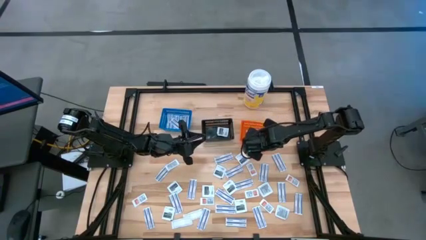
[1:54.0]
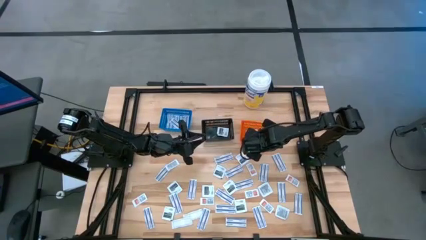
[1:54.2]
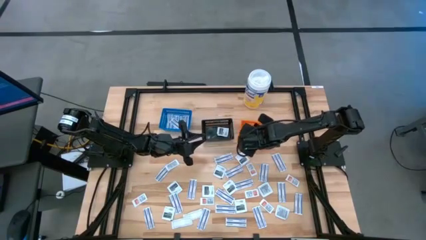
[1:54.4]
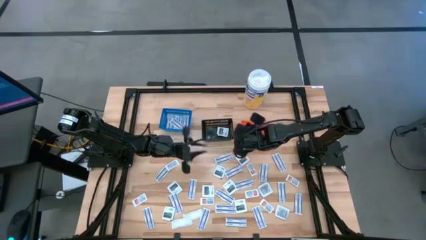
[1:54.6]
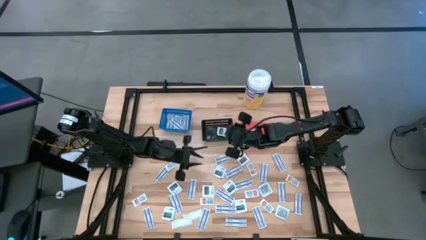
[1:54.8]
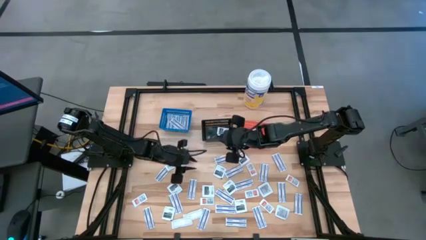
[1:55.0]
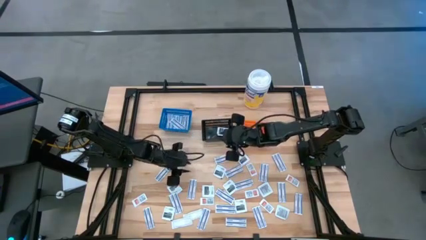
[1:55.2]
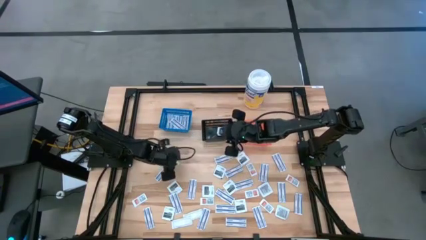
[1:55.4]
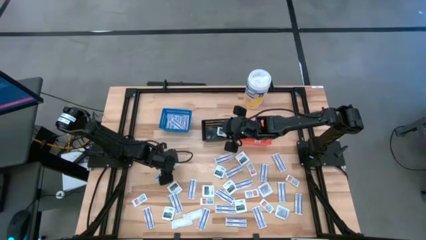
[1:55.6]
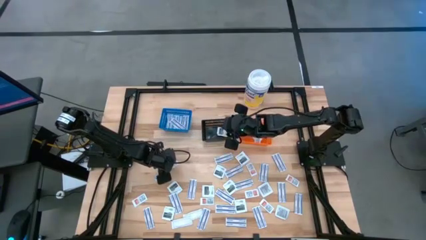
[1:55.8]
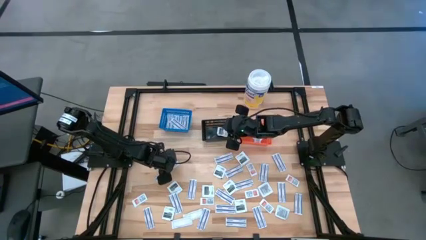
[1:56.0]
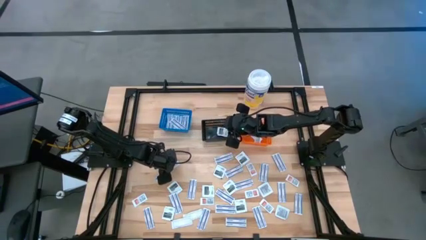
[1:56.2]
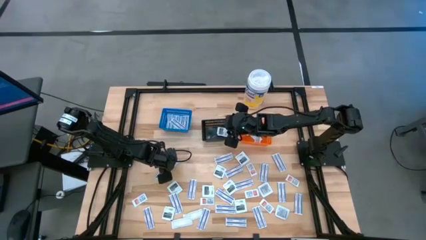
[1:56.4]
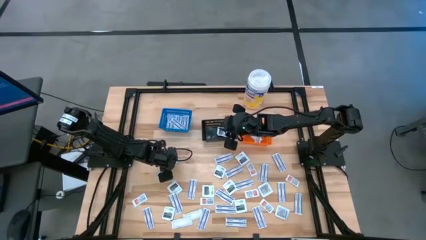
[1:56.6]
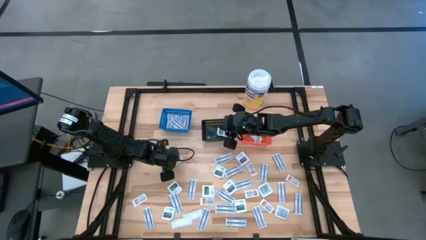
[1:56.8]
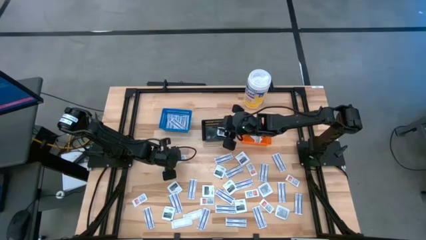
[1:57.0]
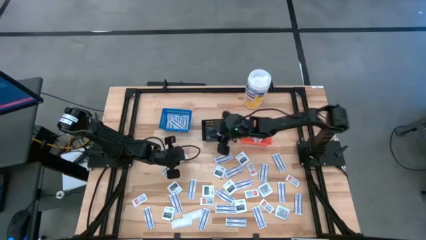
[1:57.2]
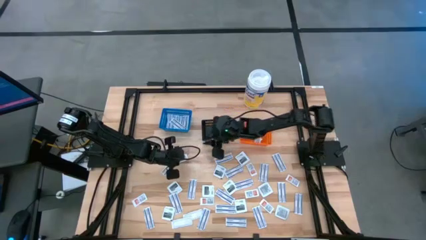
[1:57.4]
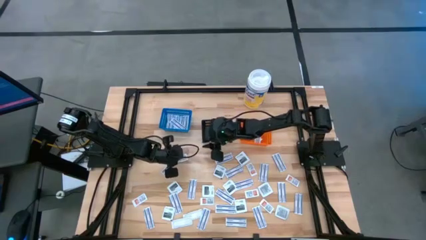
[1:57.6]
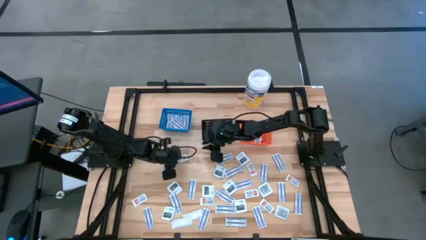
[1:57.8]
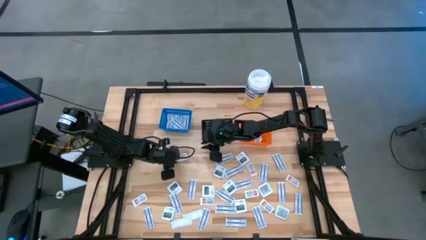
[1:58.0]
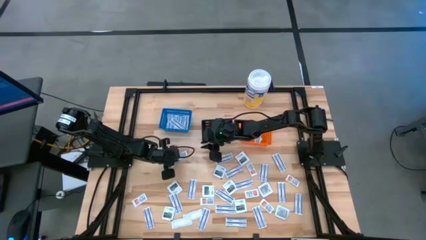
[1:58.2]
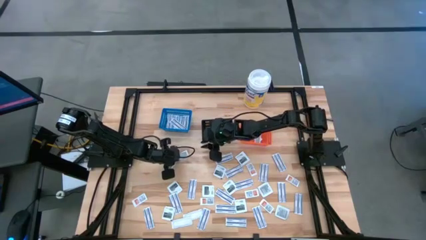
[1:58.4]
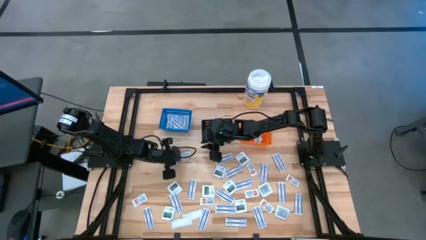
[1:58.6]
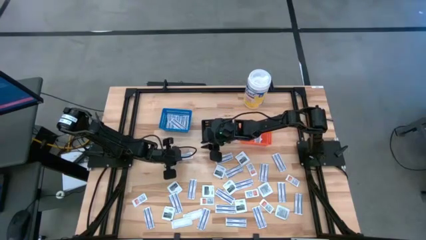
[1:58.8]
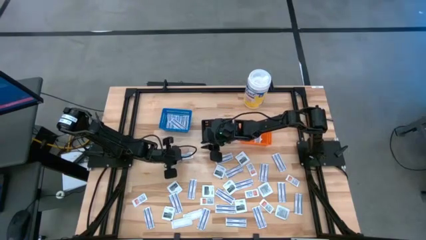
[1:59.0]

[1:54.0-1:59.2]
Task: Pick & Place First Aid Supplies
Put the ointment pack into the orange bin

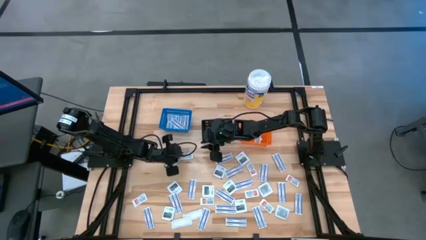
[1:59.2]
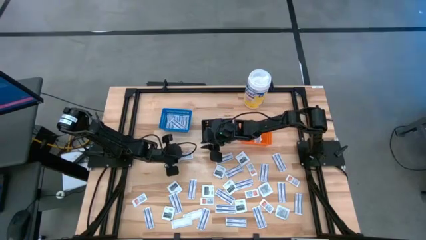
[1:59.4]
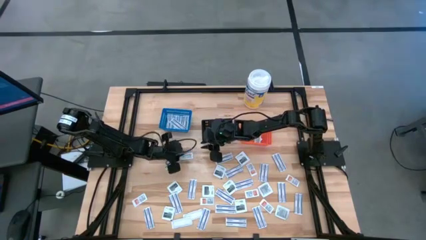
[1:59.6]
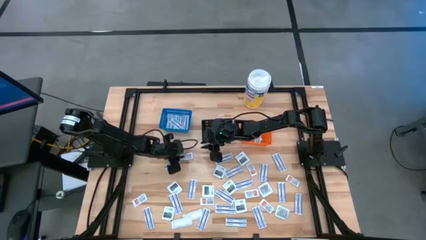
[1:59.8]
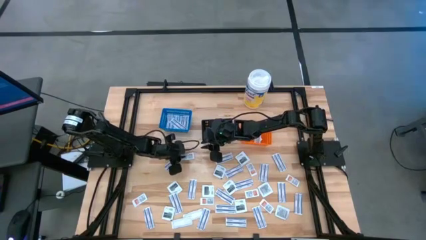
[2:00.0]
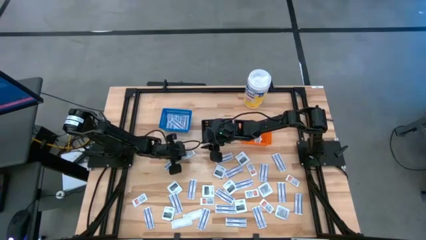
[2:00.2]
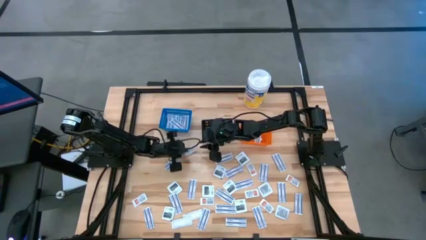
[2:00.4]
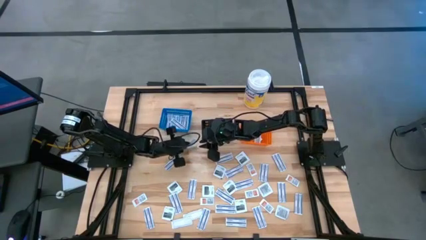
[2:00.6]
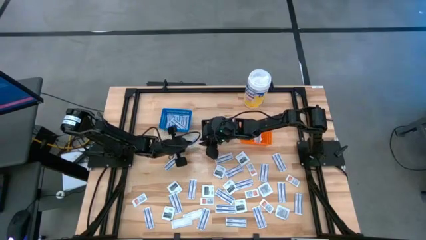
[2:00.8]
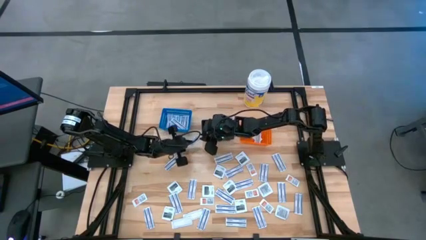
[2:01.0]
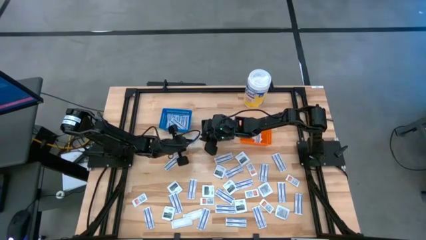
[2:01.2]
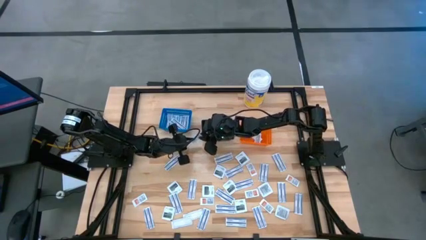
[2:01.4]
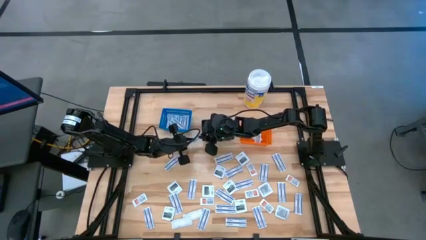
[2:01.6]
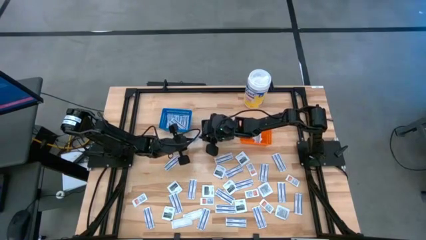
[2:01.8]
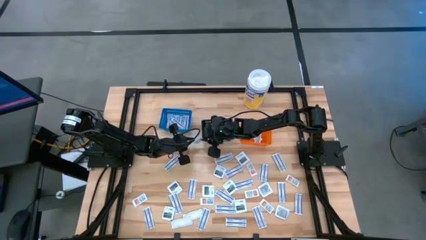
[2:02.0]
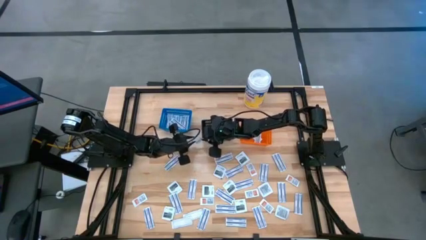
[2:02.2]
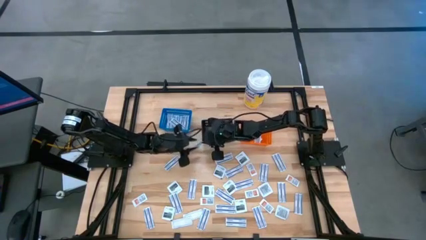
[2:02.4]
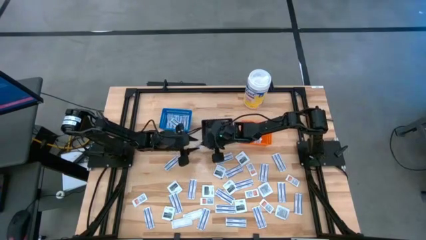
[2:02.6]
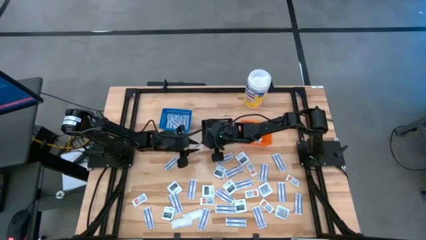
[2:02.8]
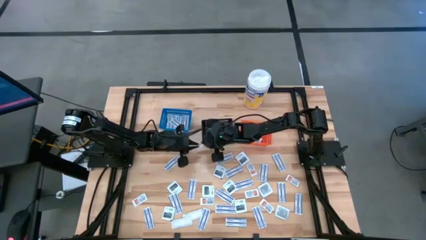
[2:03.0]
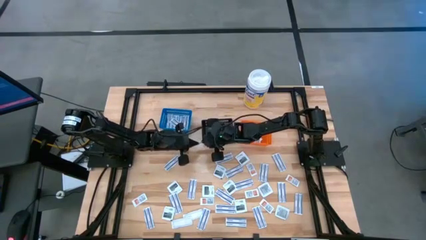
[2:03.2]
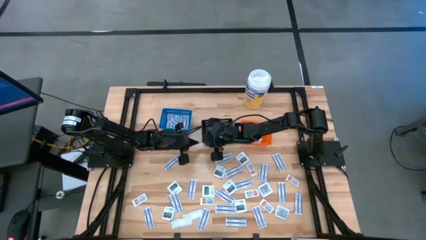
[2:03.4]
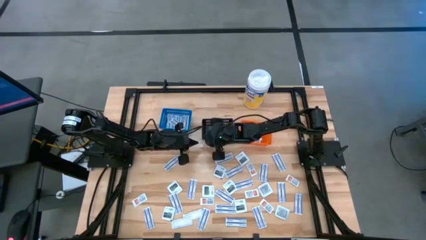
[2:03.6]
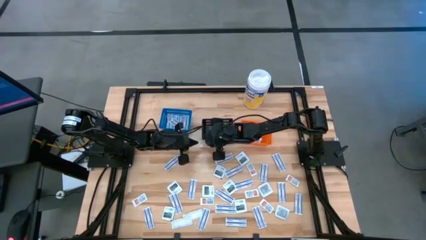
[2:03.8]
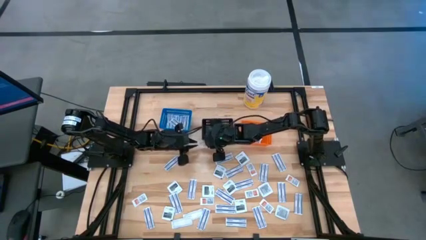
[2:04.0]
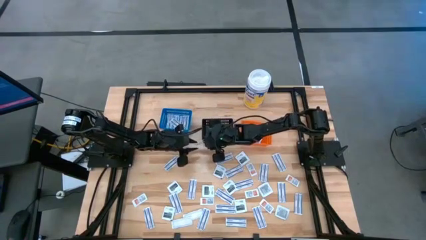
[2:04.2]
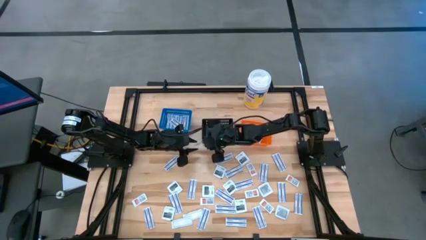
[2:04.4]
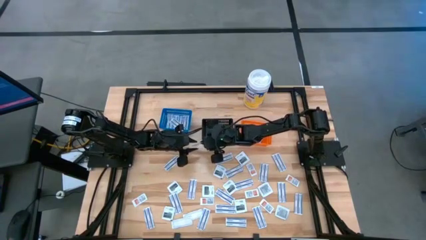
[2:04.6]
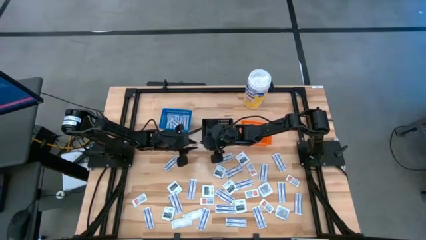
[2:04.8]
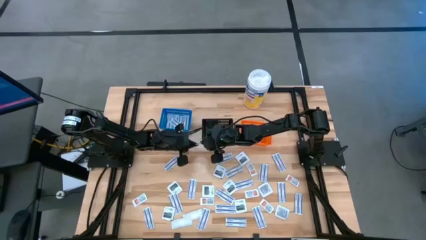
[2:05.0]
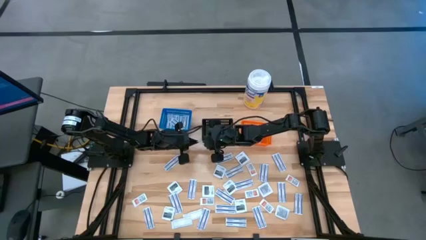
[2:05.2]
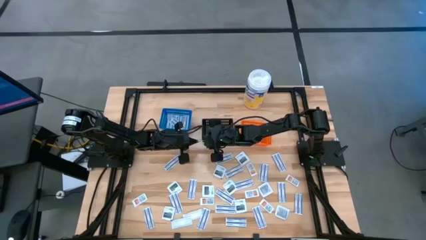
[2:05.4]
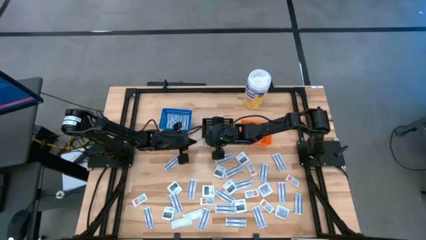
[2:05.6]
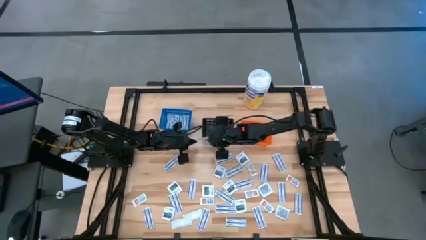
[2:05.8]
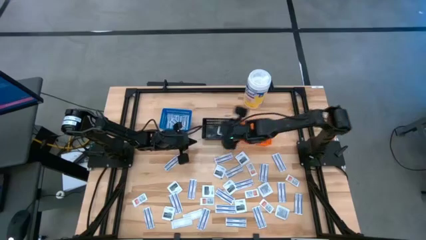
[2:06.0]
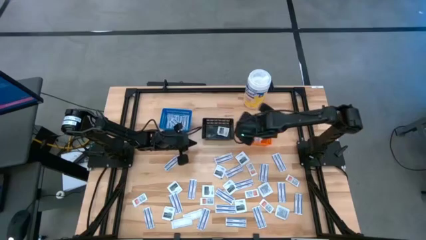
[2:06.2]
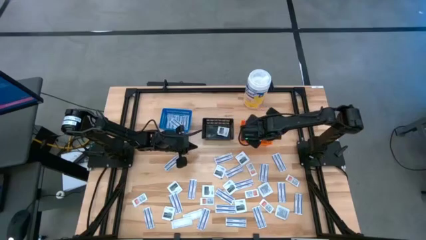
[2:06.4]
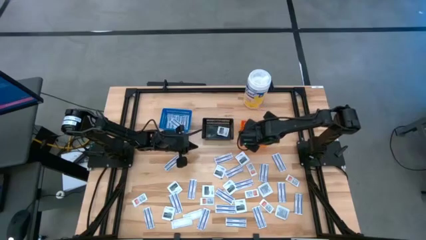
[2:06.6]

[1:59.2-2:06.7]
Put the ointment pack into the orange bin

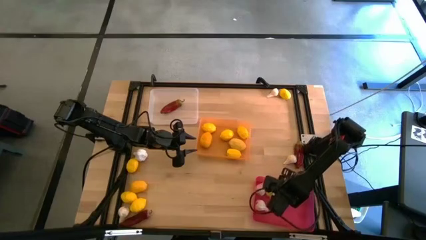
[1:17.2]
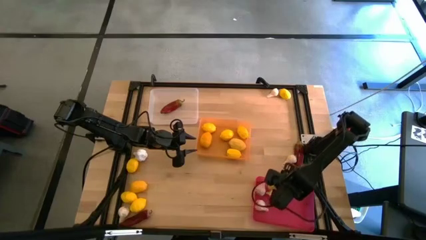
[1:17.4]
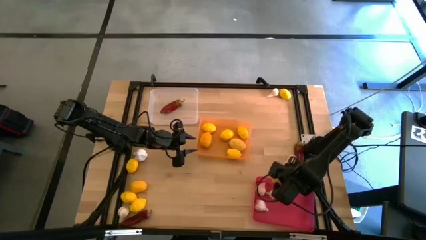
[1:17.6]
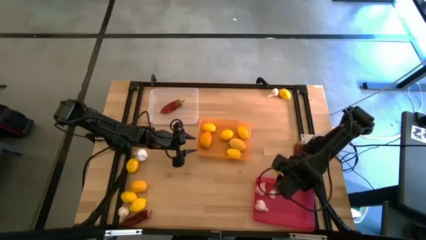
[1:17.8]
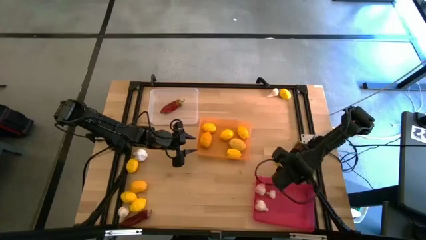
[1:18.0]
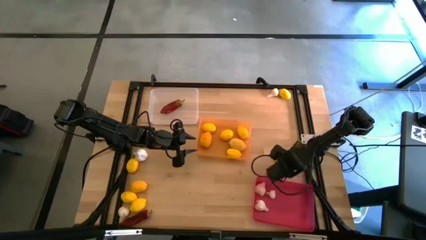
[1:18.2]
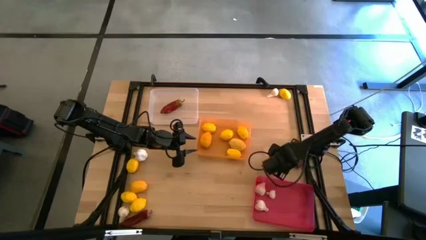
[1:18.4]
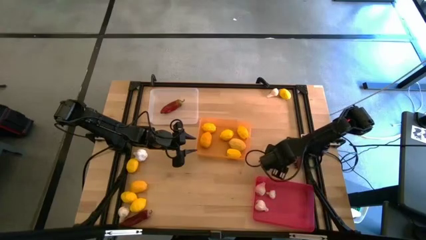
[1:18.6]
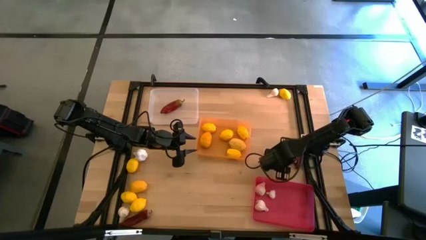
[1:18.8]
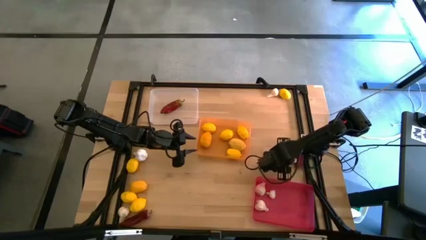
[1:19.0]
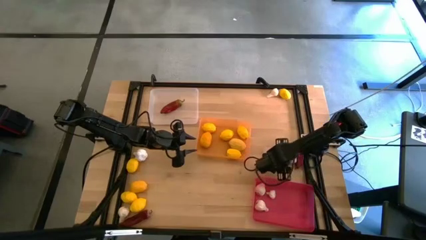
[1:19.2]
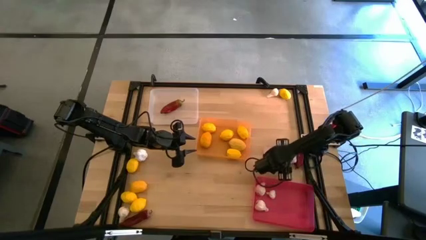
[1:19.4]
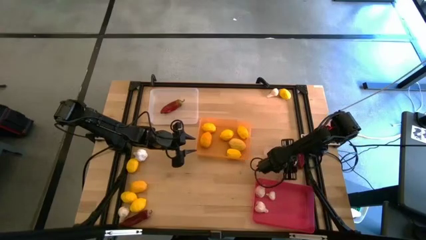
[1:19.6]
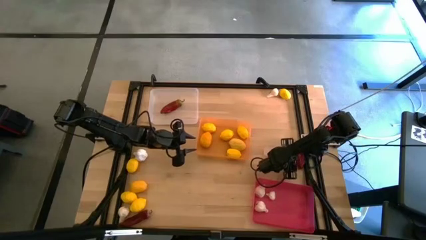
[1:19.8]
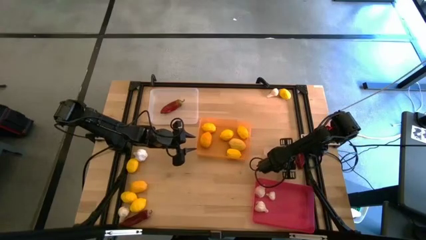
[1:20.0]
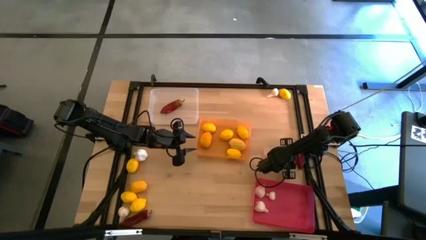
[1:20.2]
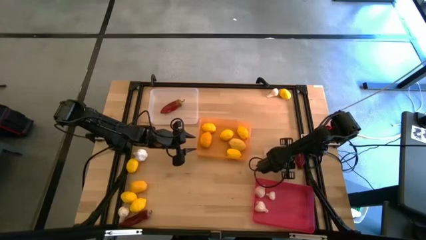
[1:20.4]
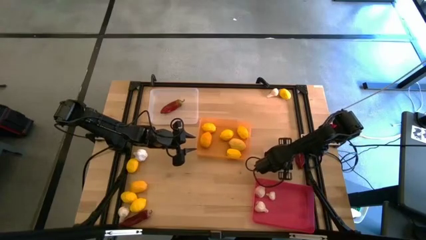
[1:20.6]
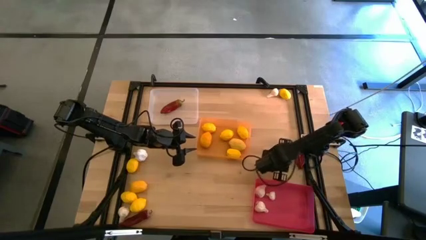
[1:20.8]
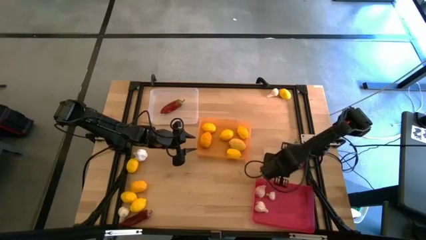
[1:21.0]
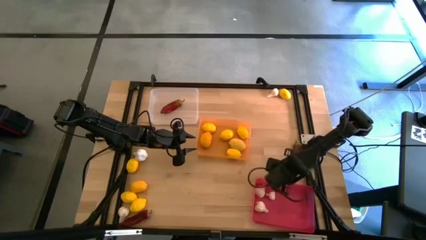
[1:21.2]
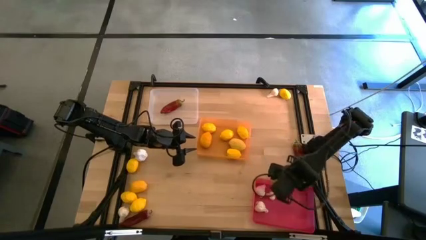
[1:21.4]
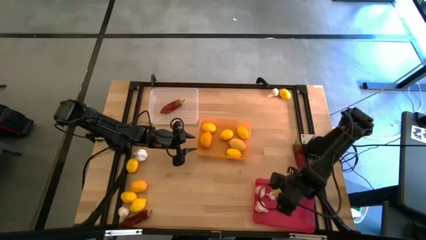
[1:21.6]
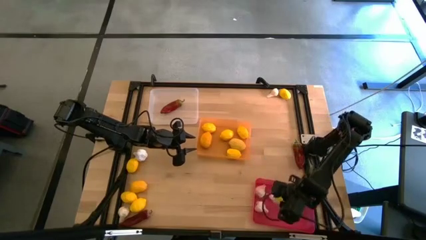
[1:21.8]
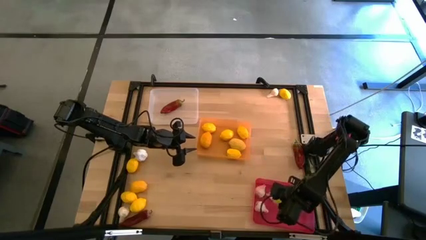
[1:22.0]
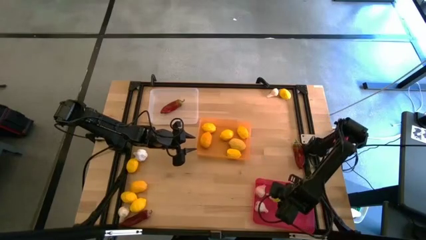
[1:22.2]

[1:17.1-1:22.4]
Task: Sort produce into baskets
Put the garlic into the red bin
